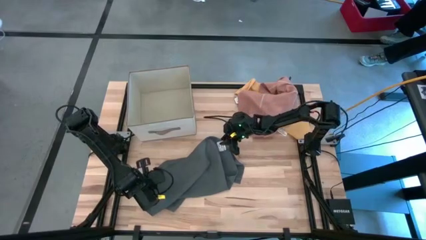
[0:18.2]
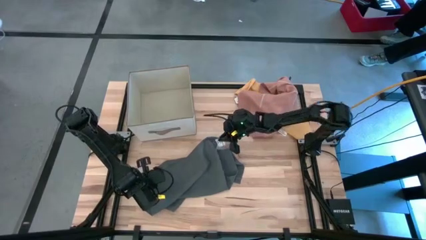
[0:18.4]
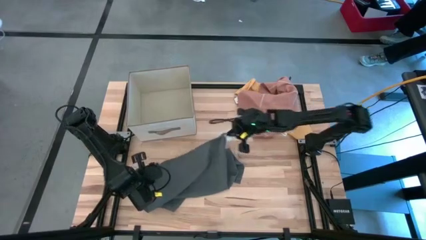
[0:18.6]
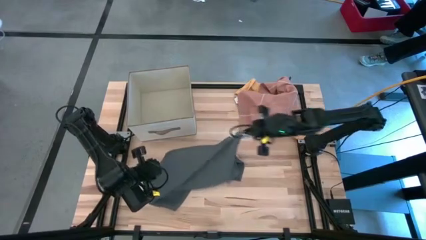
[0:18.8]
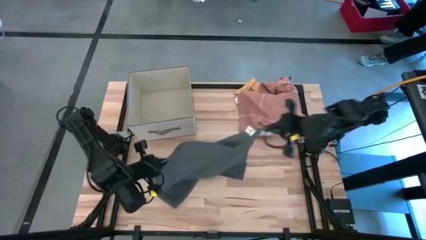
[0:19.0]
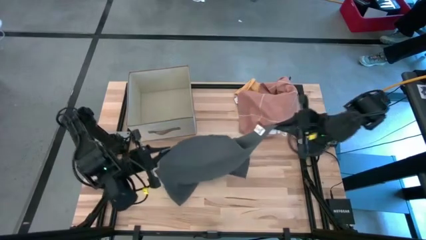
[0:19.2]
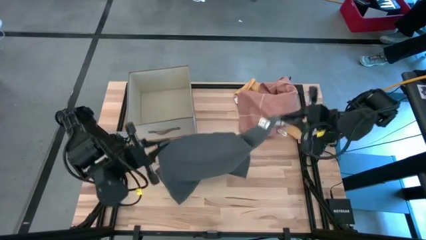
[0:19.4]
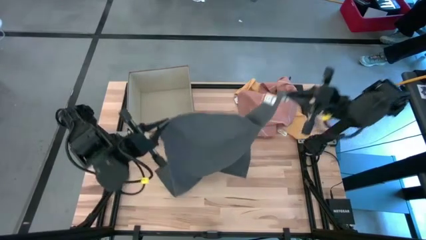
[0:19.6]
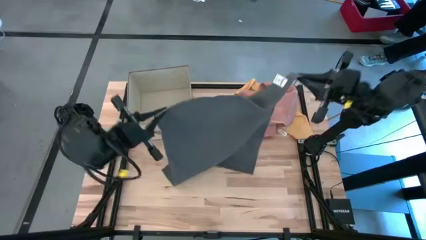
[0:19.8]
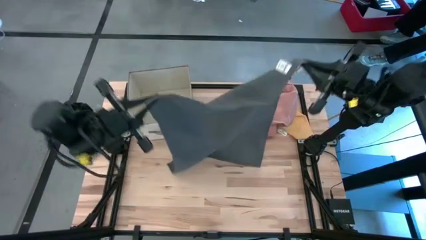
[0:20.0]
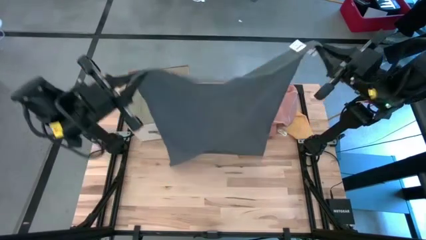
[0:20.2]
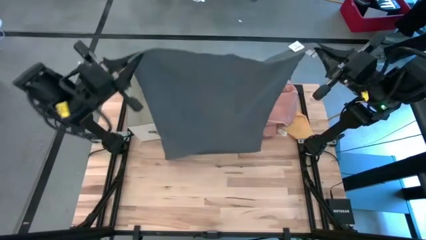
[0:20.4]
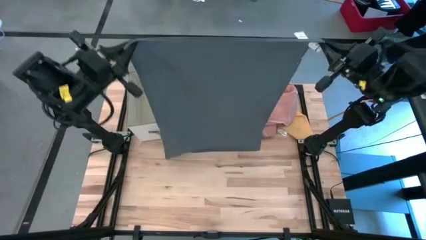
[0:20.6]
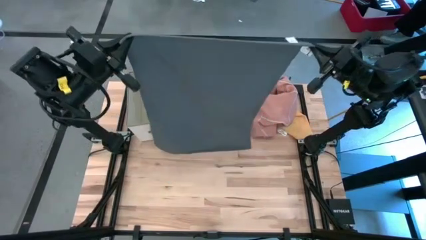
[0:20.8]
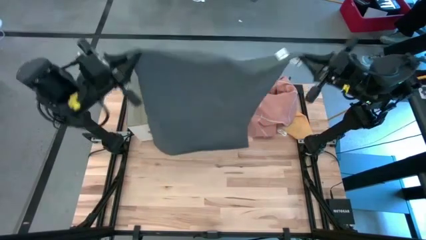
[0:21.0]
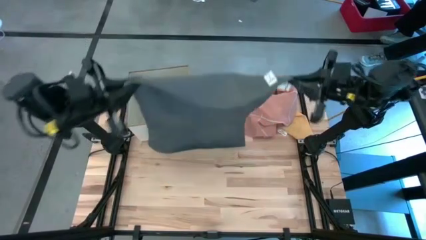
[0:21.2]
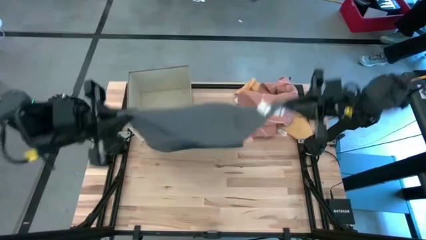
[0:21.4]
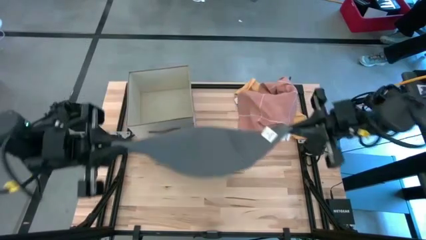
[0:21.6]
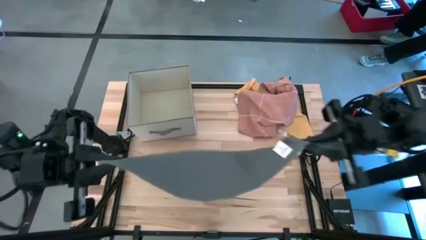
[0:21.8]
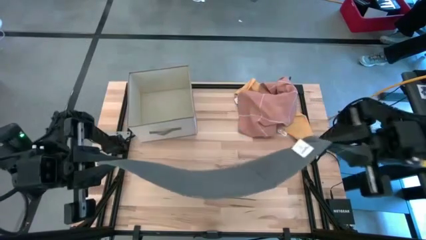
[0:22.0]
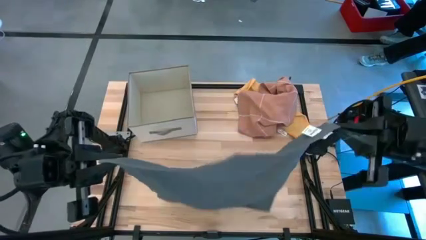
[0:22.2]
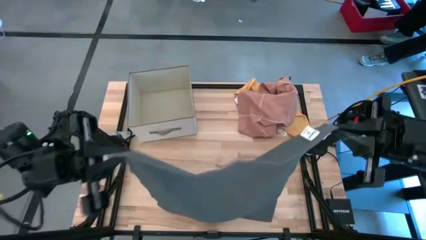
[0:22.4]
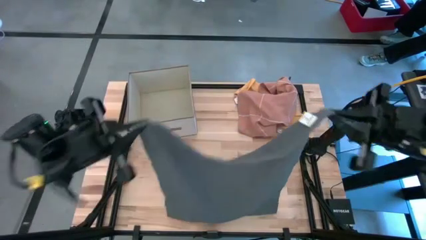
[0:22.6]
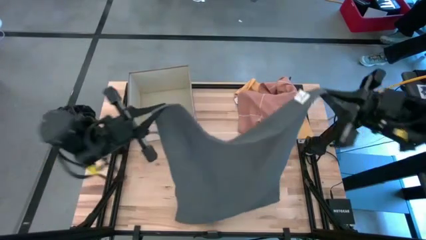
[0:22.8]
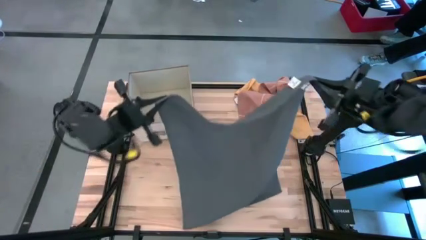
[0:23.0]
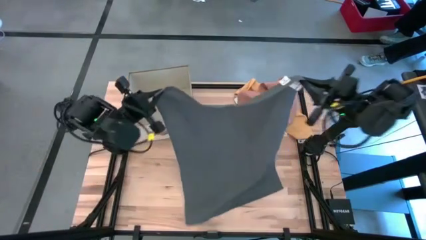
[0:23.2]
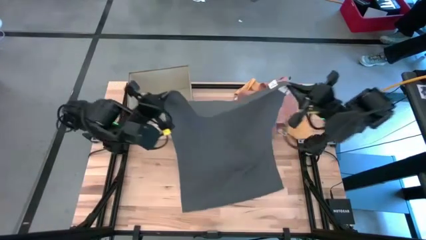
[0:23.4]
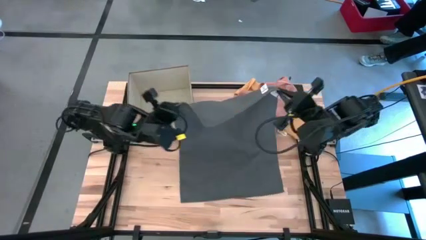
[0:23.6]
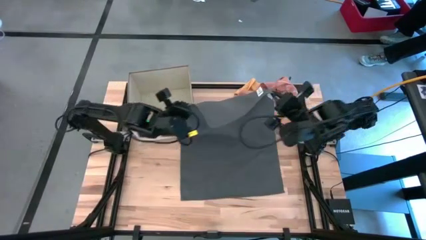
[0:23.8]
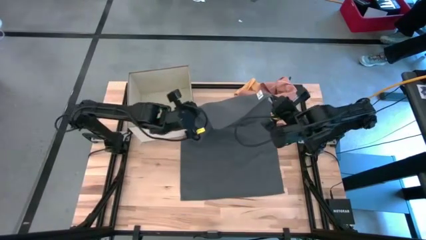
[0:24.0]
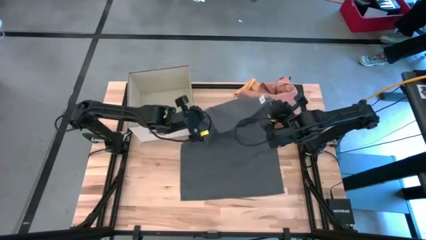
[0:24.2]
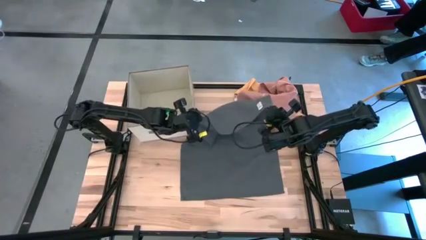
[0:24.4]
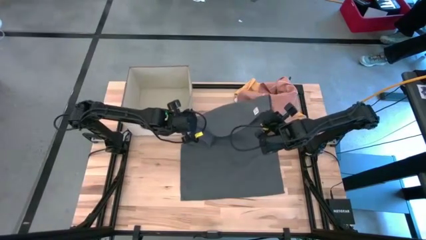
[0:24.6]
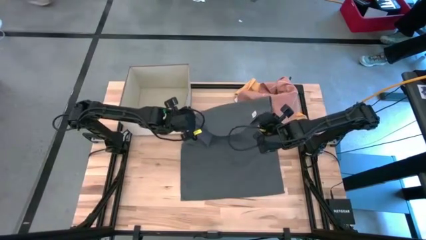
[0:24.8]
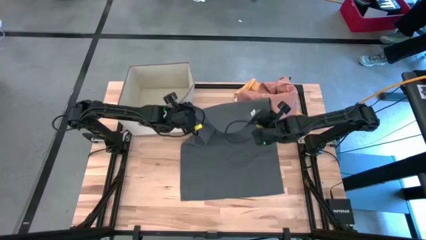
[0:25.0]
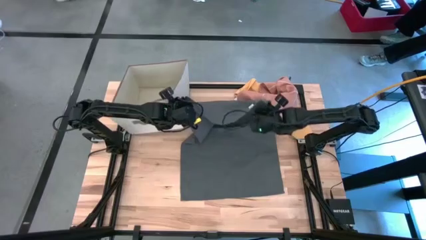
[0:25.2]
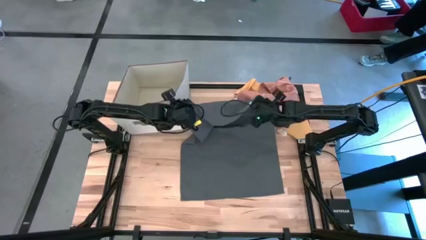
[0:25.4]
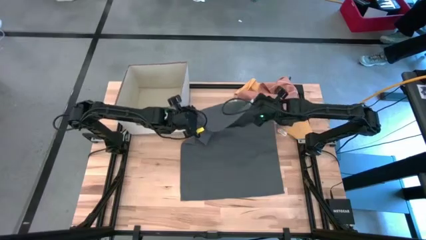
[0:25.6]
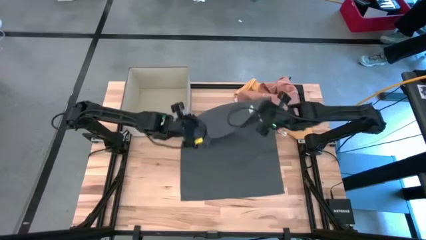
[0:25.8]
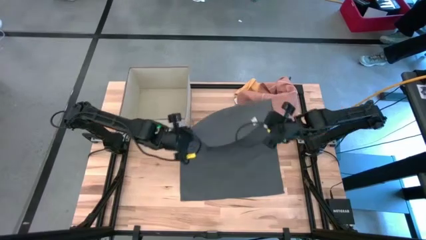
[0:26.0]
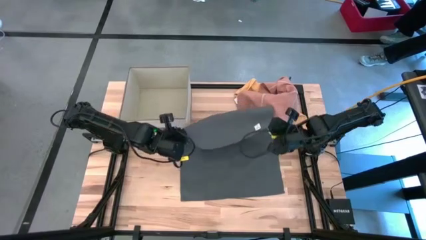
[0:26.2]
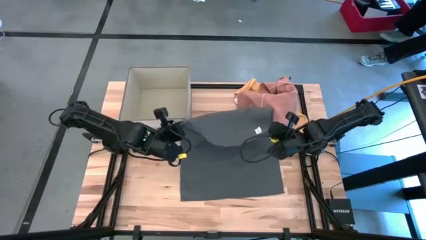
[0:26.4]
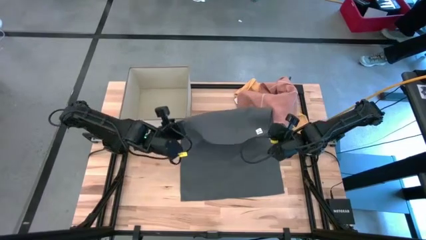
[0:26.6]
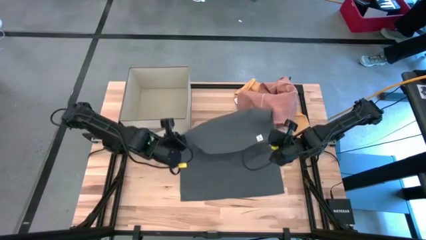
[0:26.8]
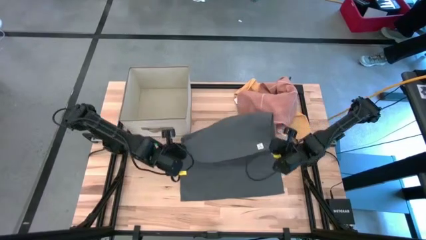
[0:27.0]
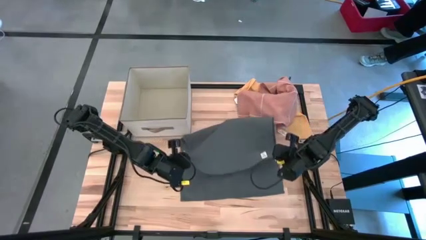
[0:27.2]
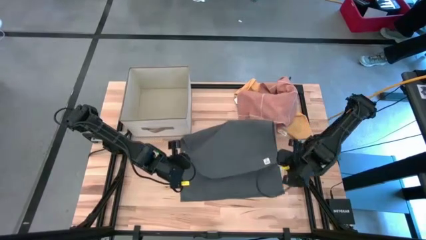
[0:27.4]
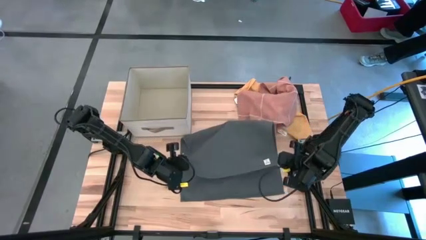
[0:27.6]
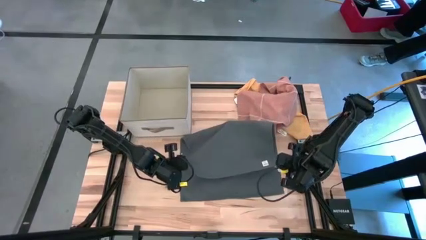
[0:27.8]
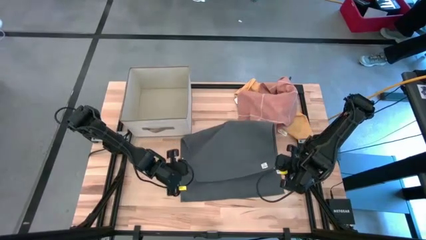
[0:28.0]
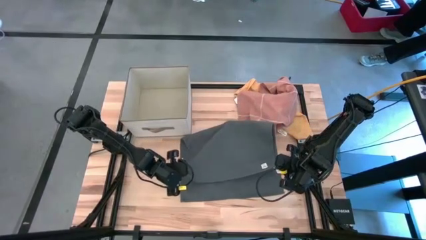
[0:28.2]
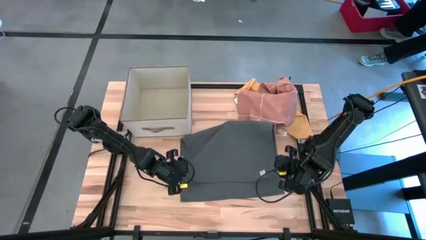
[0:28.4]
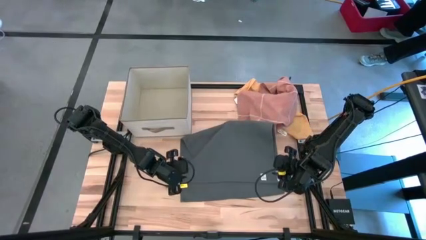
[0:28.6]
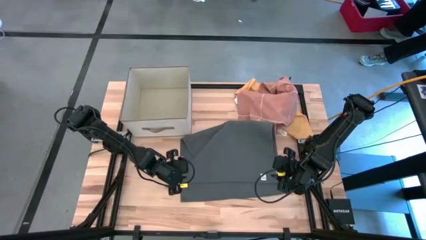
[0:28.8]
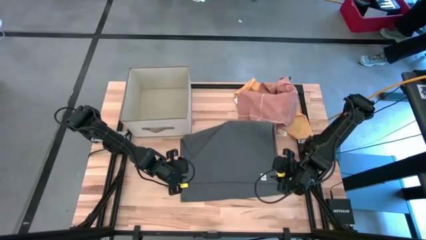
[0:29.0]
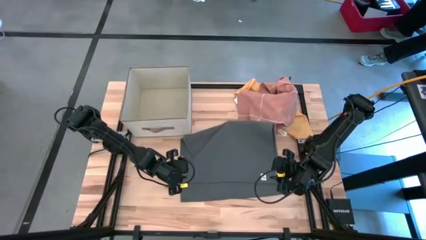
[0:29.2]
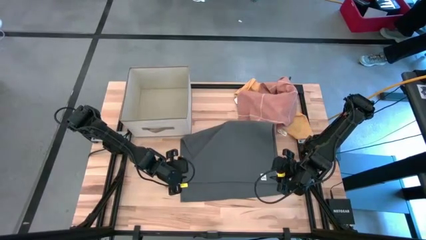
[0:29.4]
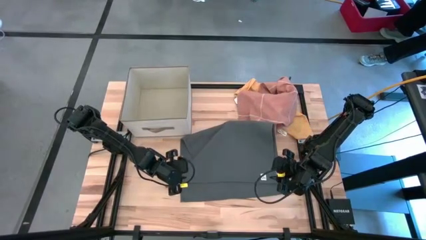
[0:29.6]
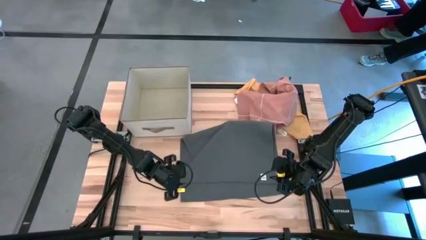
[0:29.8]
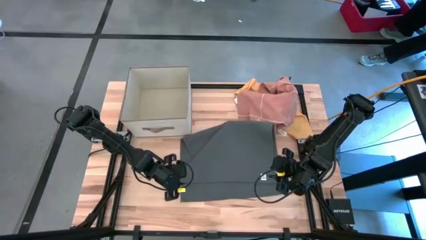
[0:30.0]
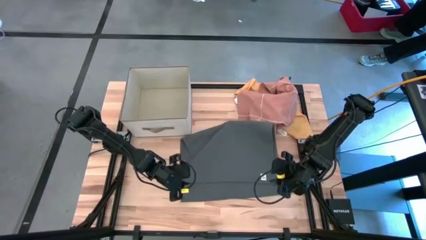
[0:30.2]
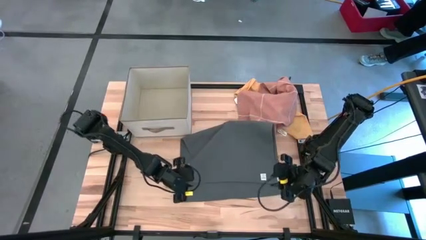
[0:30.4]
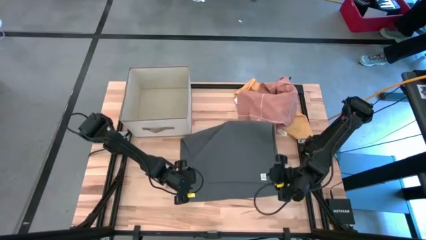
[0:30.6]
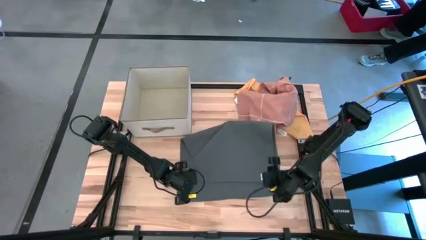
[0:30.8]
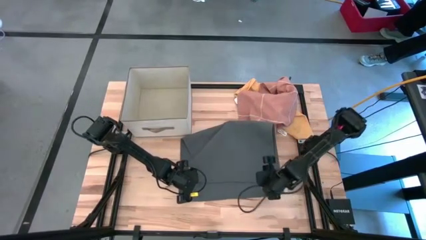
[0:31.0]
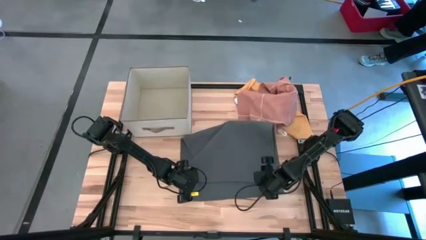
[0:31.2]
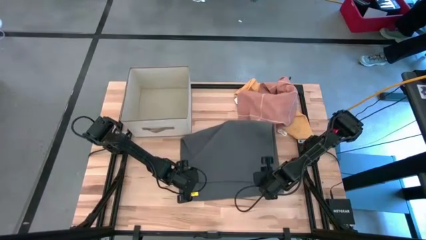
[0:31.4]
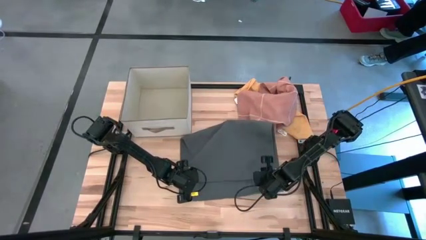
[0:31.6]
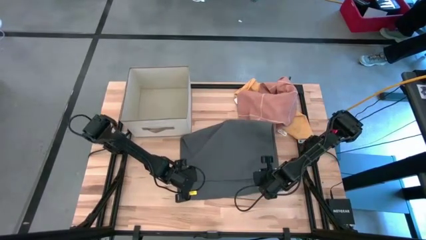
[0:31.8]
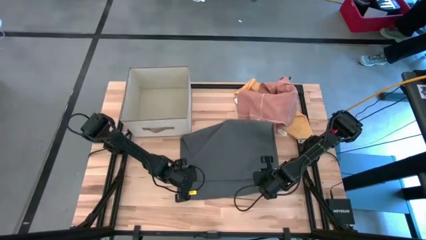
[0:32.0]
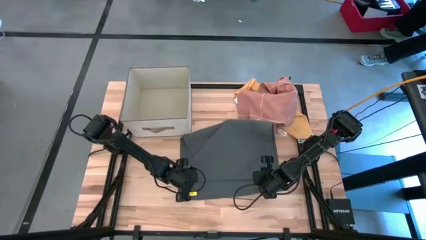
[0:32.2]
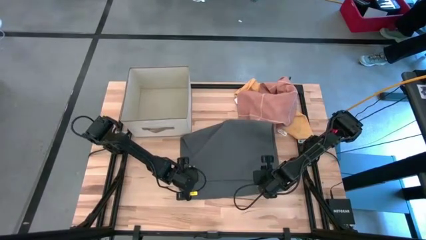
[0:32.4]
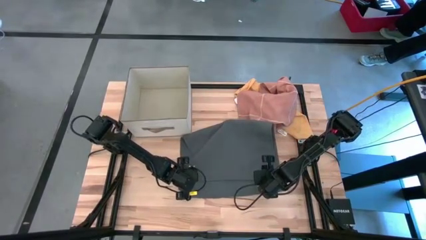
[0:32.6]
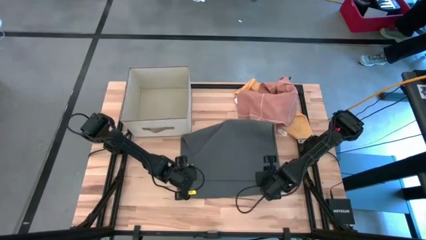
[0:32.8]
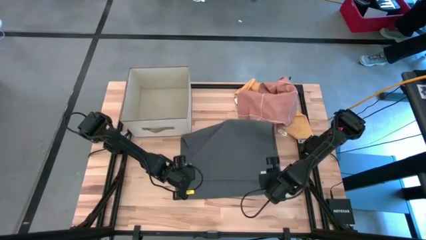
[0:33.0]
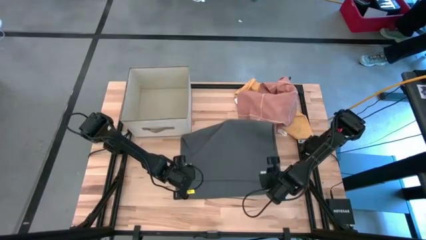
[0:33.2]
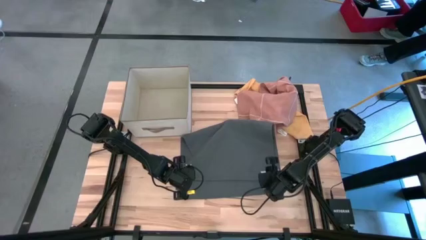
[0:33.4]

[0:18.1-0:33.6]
Task: Fold towel
Fold the grey towel
